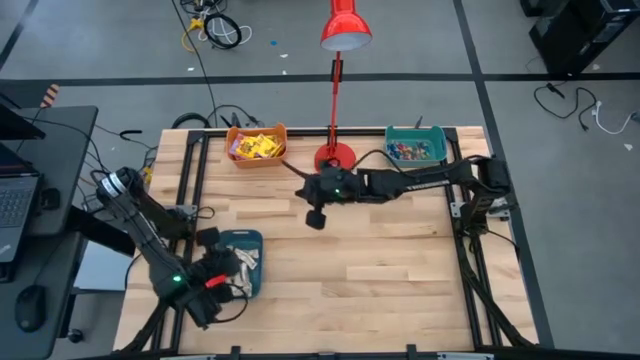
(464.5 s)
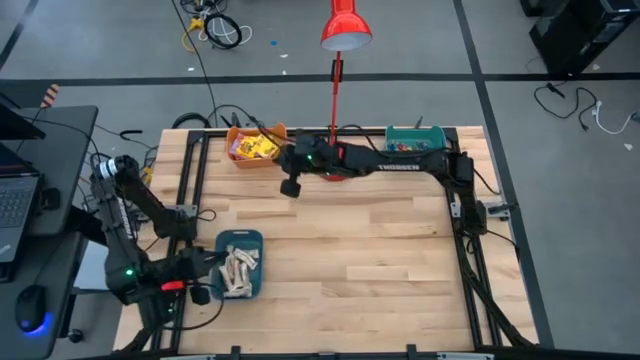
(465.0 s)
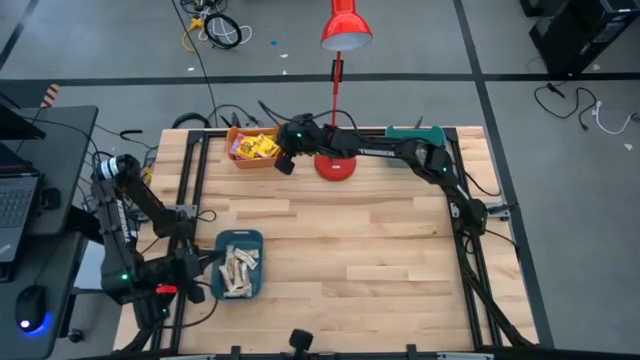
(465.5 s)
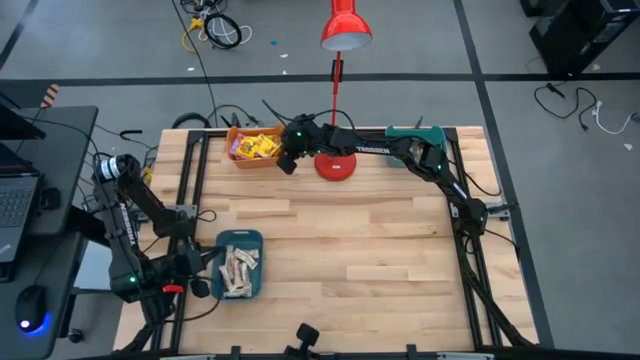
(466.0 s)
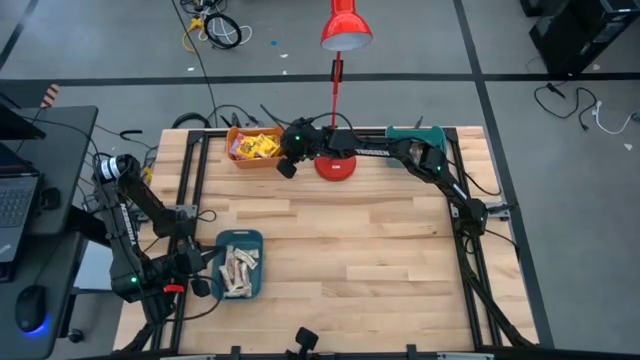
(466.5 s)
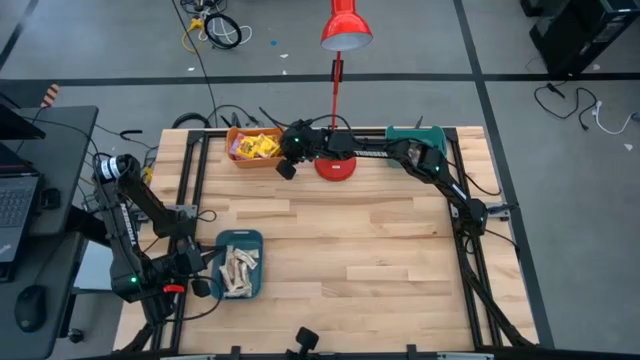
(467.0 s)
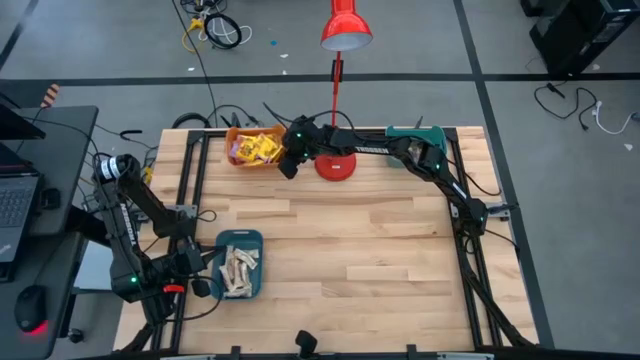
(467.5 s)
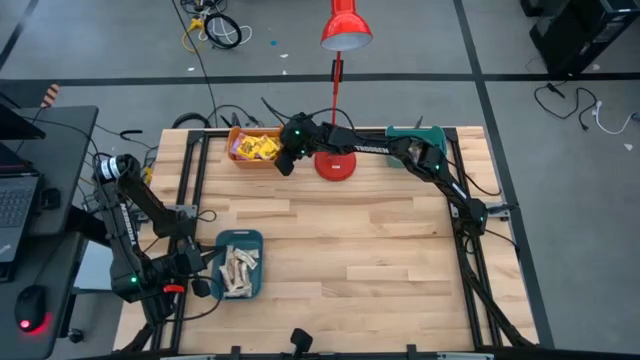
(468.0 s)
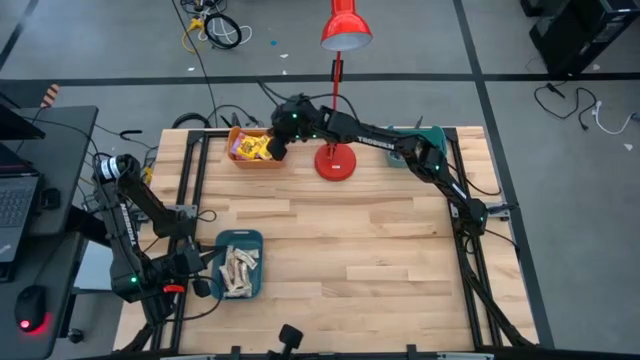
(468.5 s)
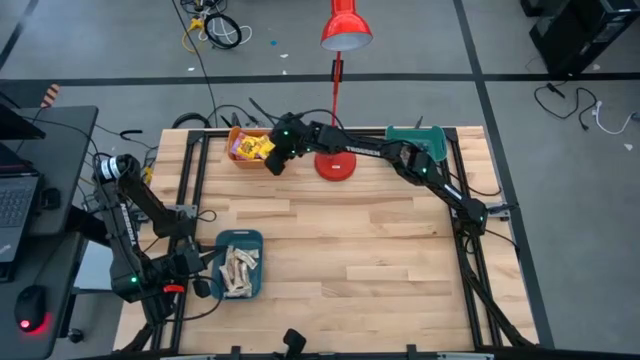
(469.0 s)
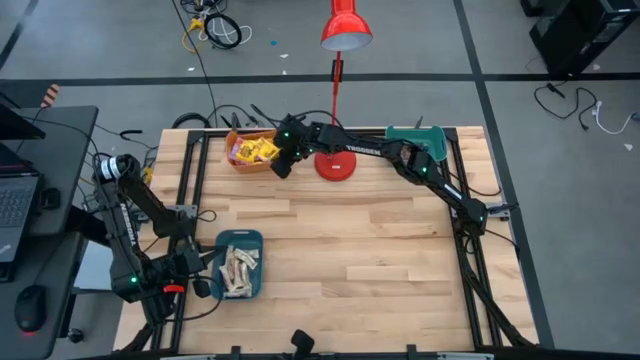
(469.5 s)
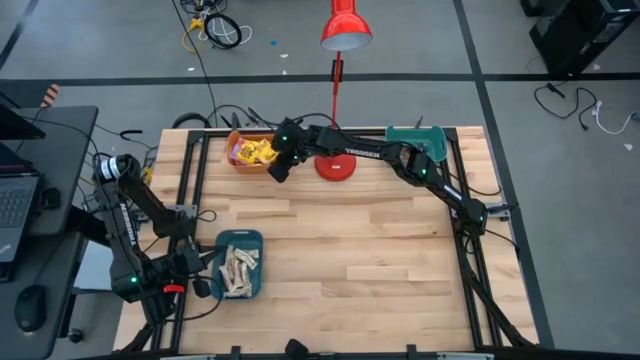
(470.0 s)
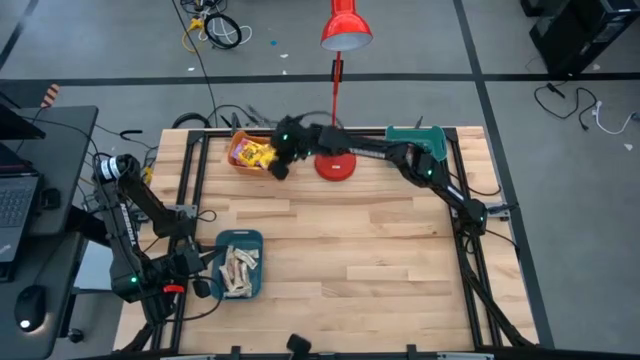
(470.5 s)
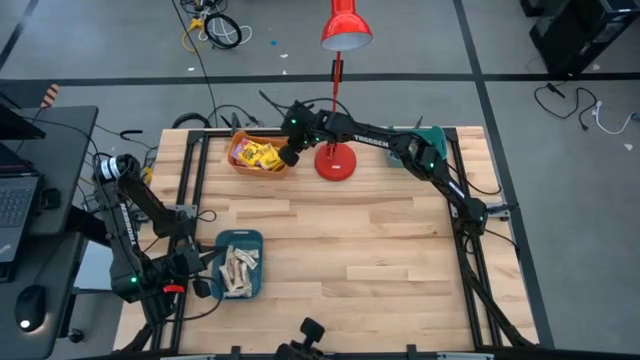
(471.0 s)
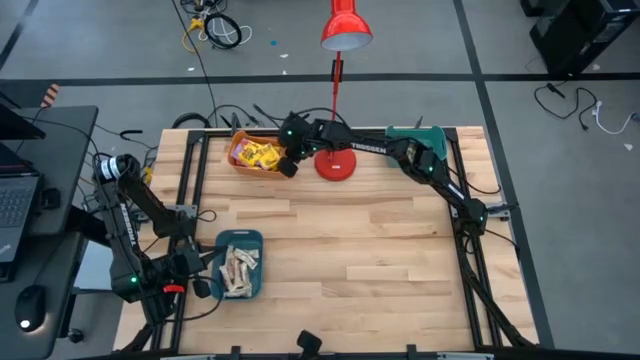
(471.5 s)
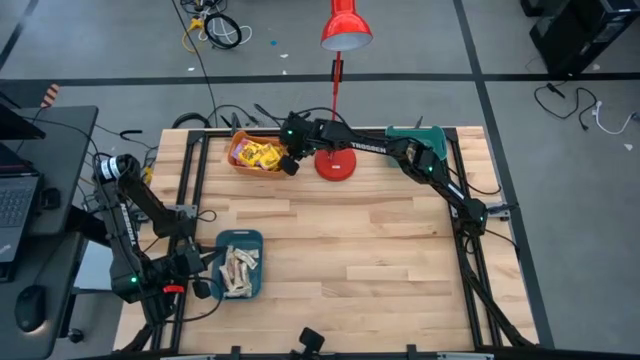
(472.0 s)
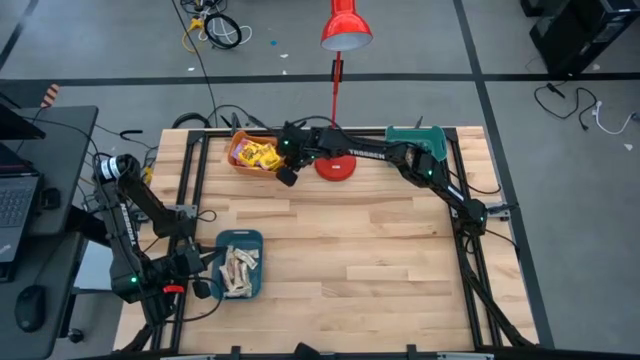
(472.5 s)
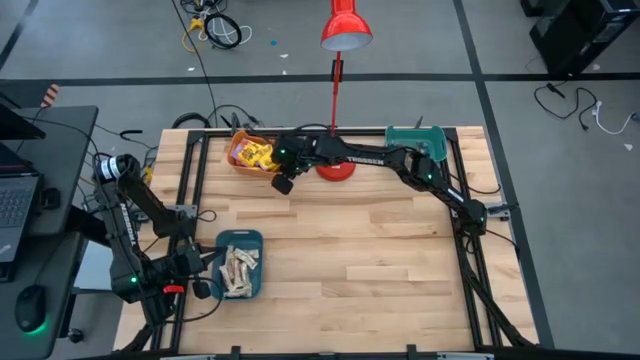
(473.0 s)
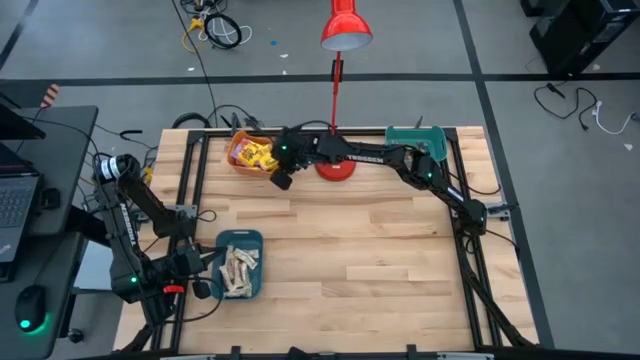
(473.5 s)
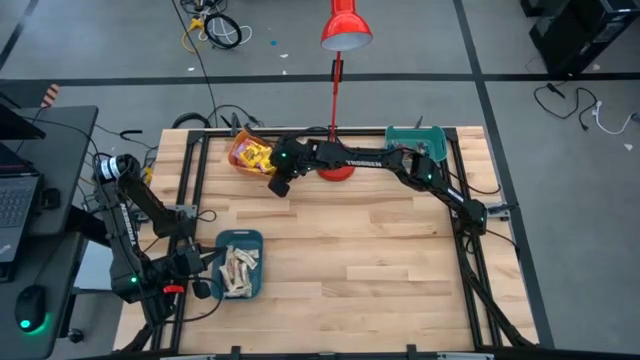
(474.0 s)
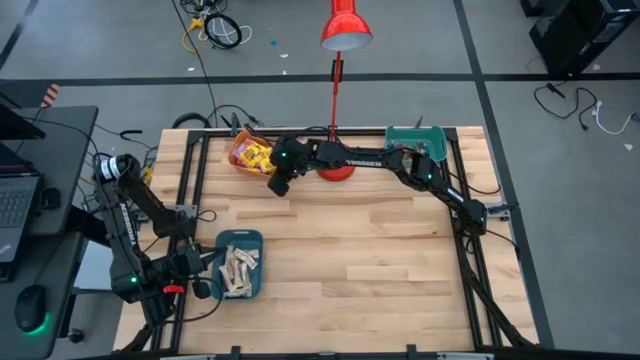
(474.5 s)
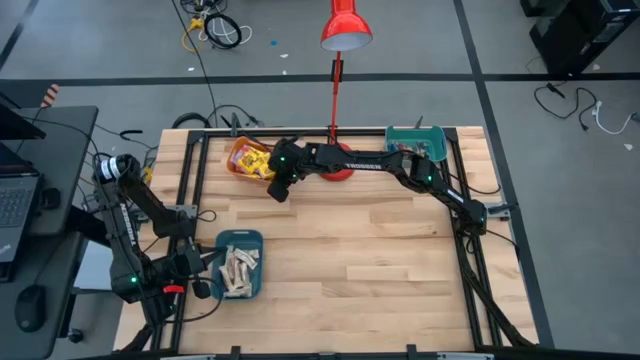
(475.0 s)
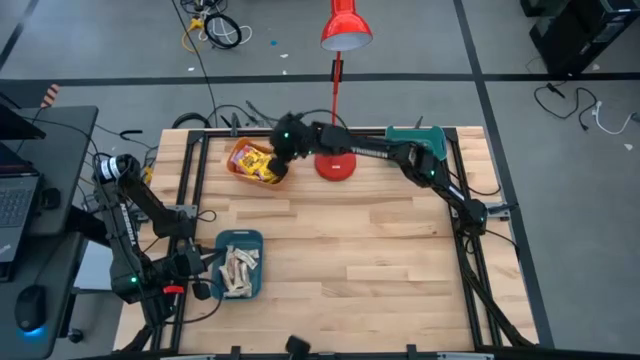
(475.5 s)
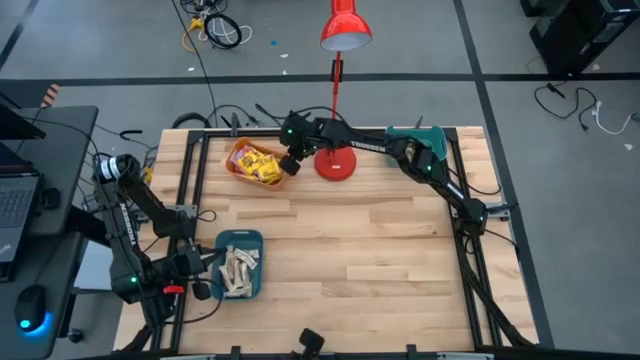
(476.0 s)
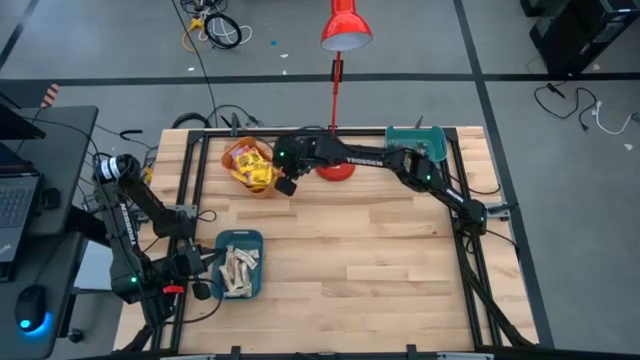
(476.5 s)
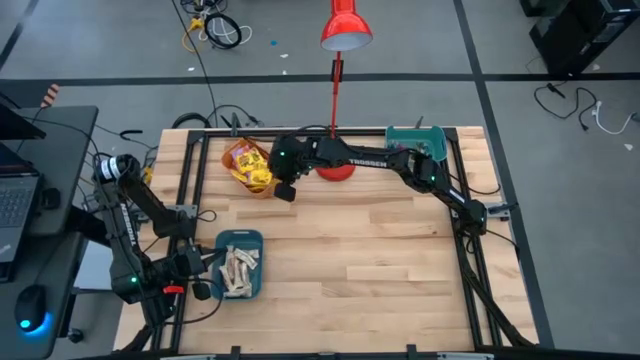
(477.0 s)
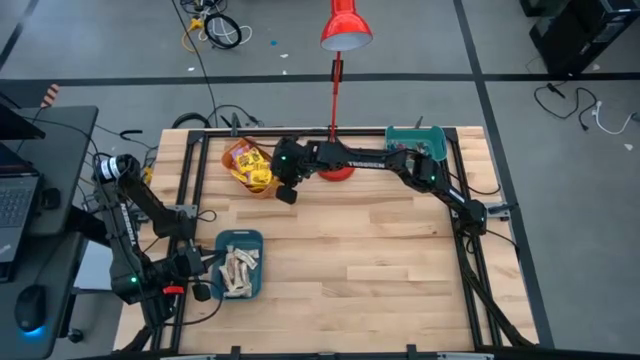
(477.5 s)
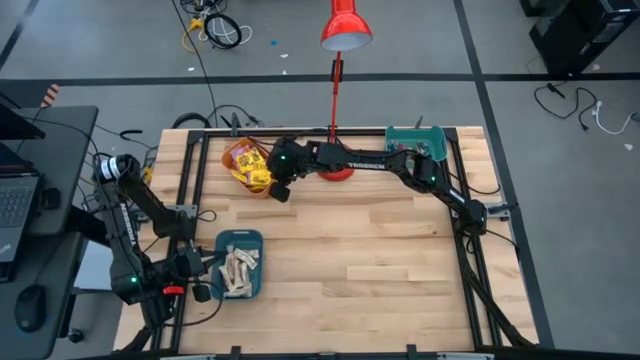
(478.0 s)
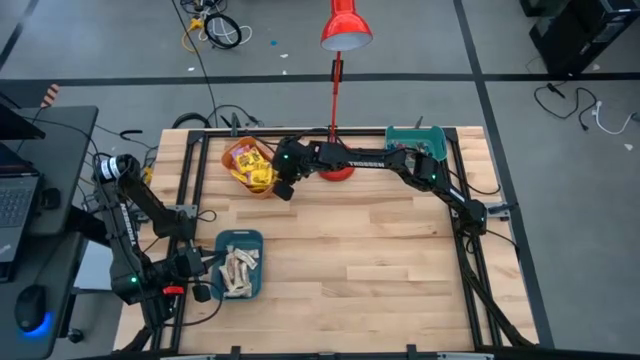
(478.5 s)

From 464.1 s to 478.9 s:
Task: Sort candy
Move the orange bin to the right of the blue bin

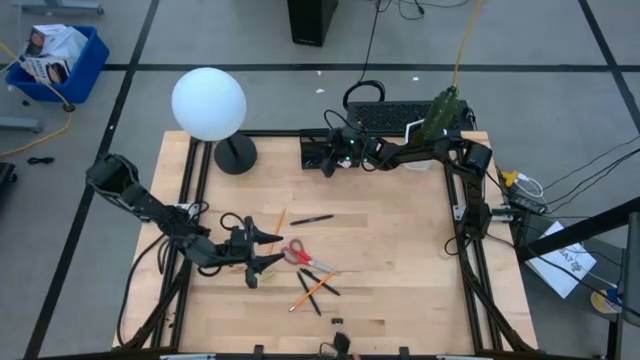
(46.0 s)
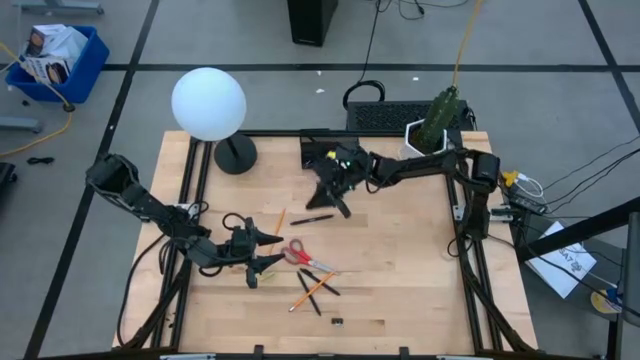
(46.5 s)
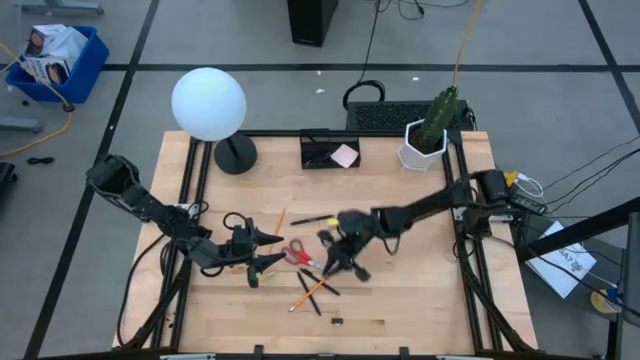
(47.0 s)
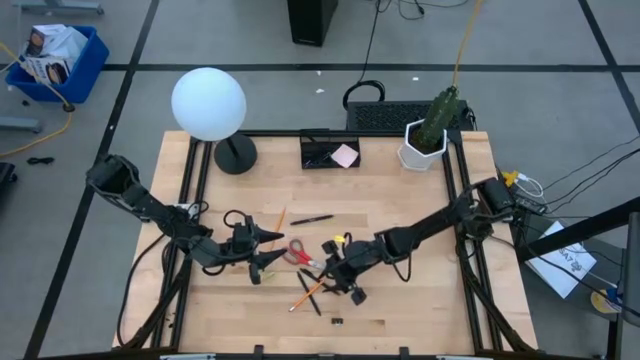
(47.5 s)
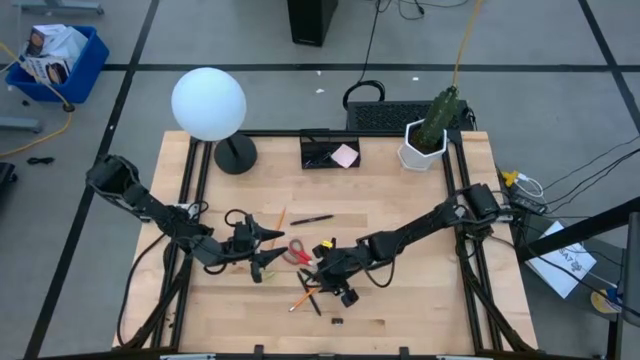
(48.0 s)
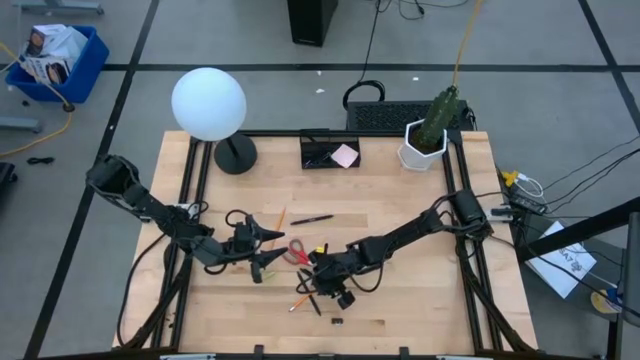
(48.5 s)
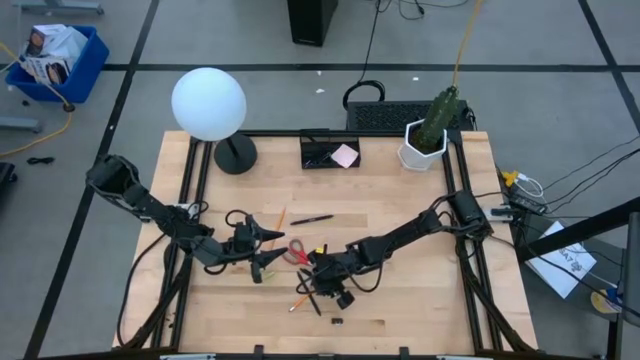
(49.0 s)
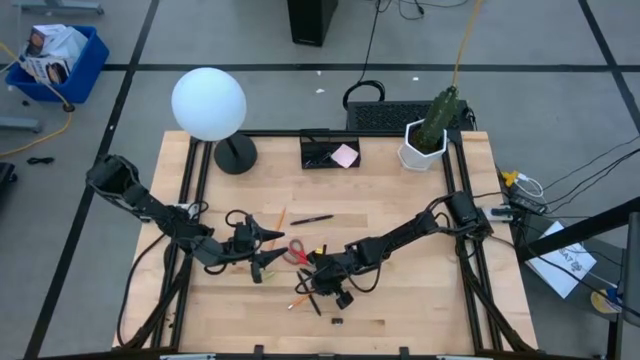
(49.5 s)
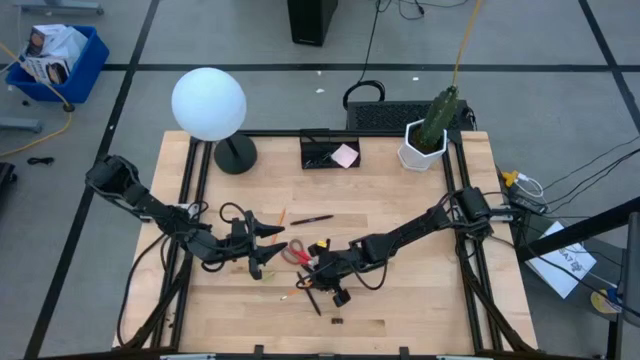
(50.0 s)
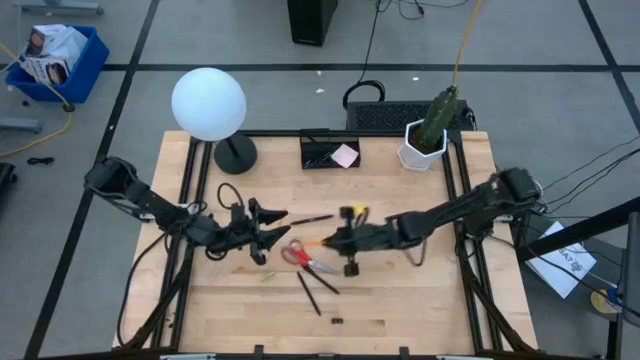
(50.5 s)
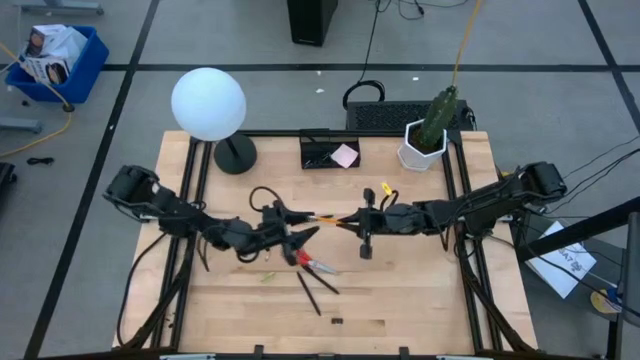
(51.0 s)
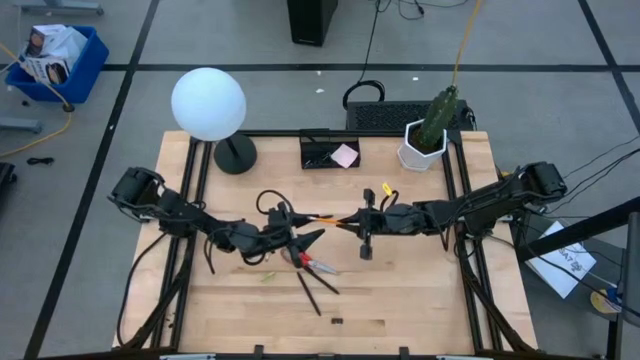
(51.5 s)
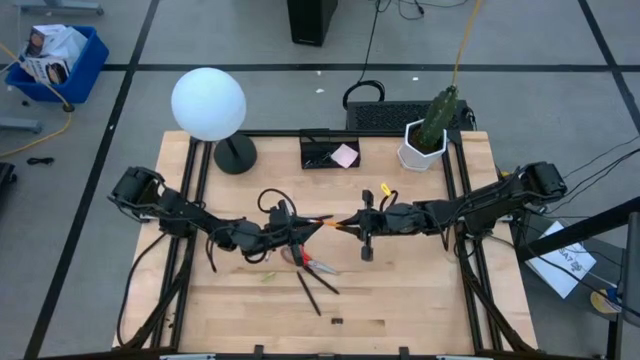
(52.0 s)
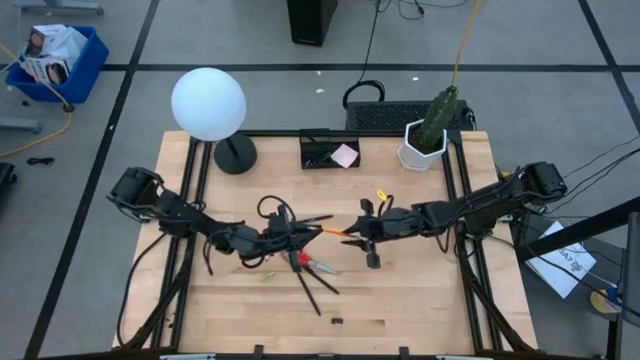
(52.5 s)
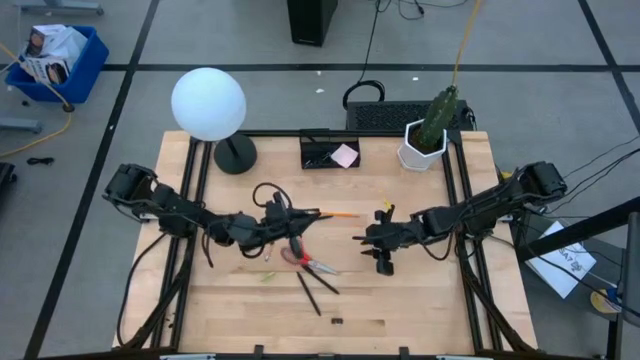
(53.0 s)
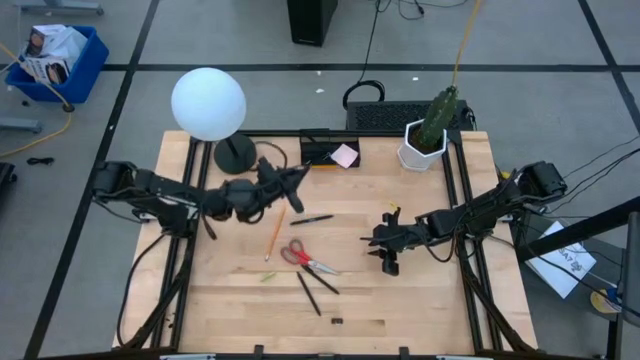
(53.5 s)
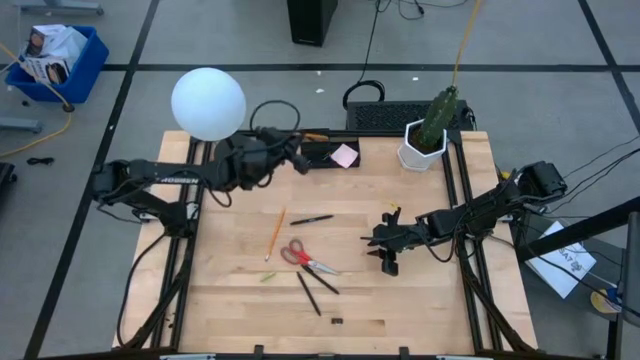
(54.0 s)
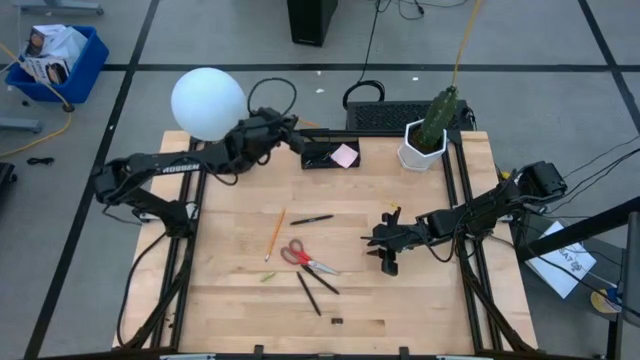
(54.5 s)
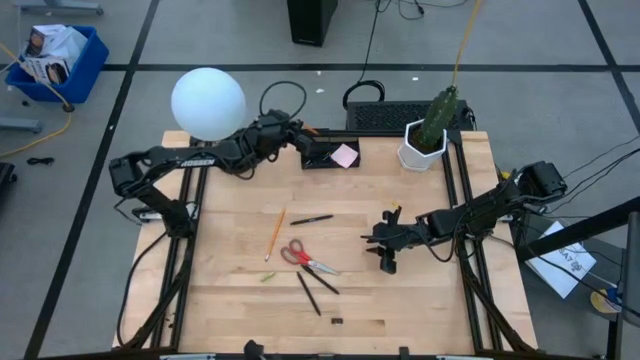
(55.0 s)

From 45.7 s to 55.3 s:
Task: Pick and place office supplies into organizer
Put the pencil into the desk organizer
